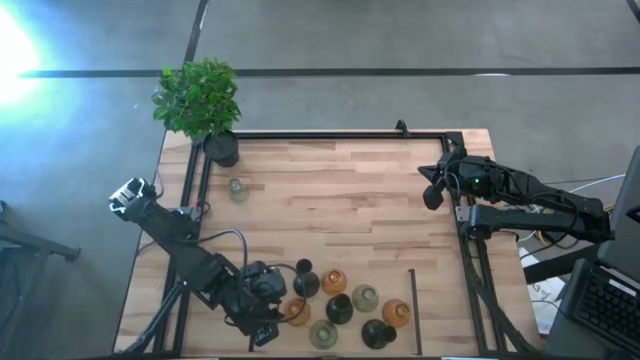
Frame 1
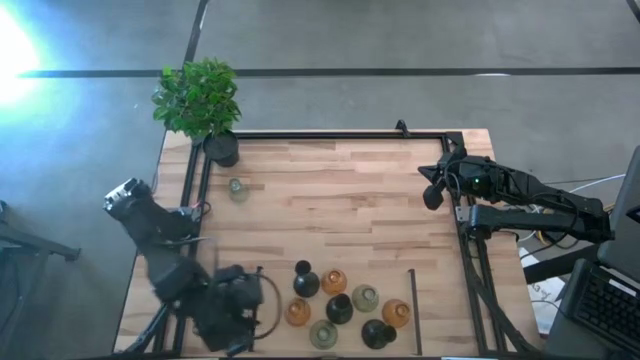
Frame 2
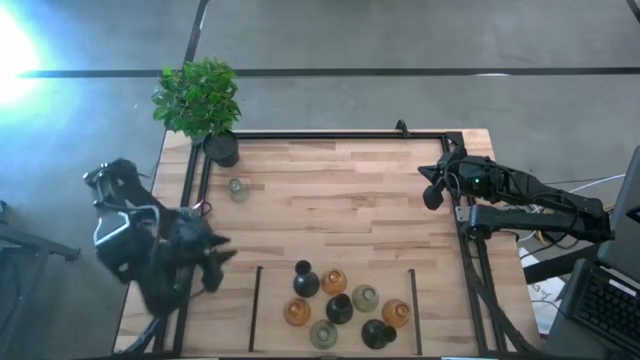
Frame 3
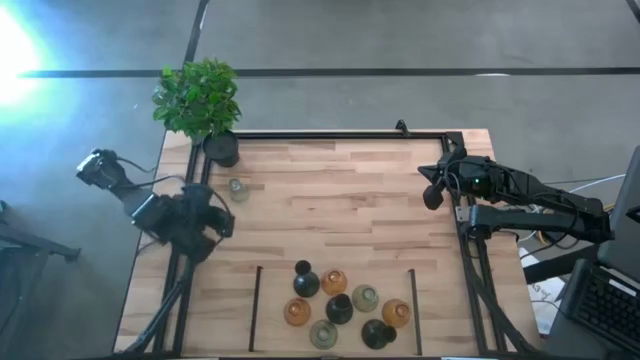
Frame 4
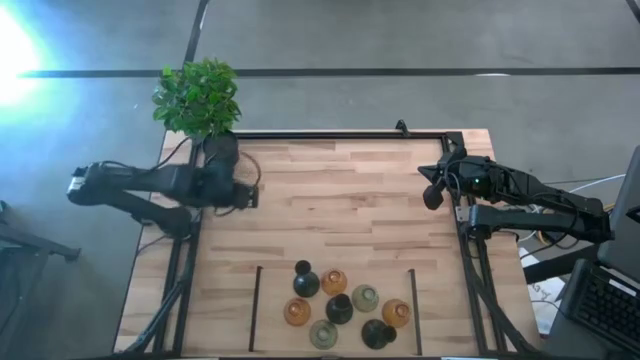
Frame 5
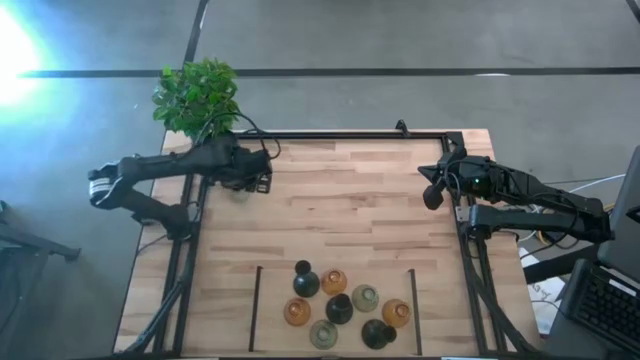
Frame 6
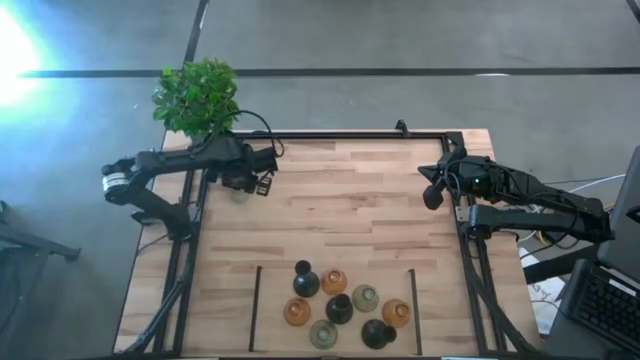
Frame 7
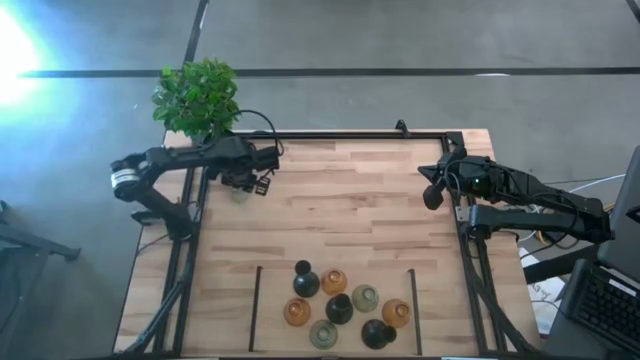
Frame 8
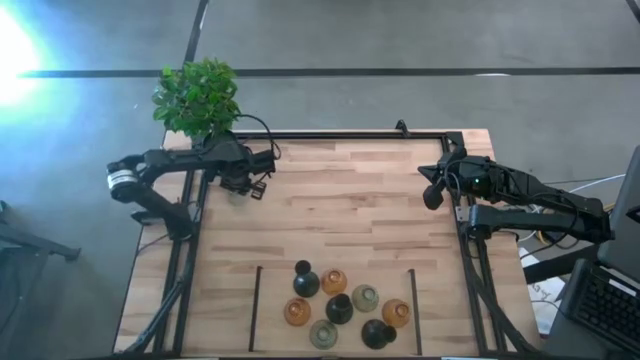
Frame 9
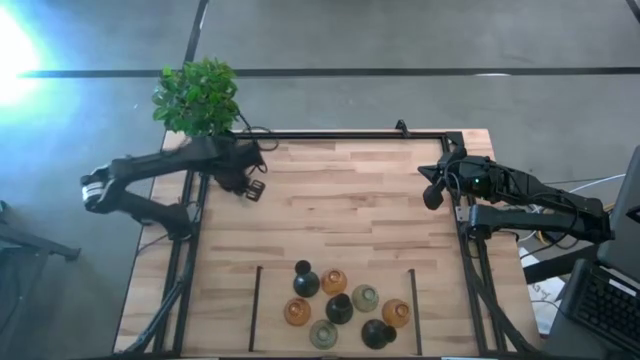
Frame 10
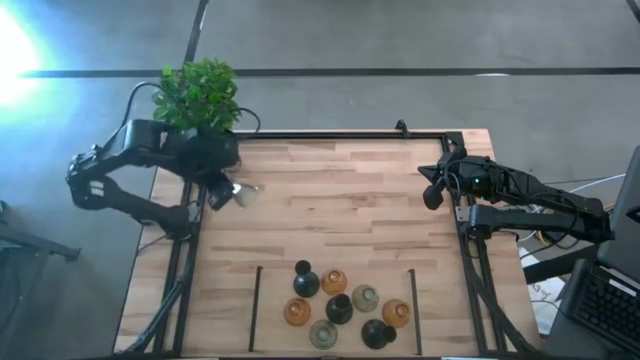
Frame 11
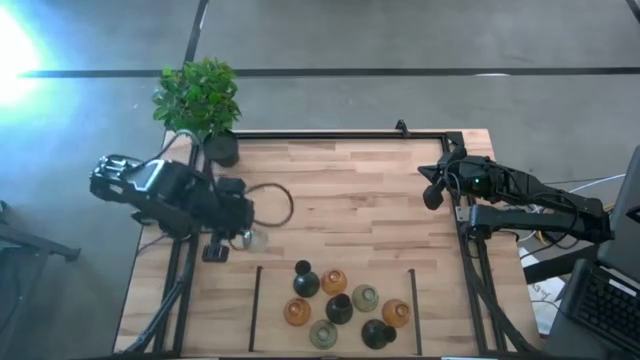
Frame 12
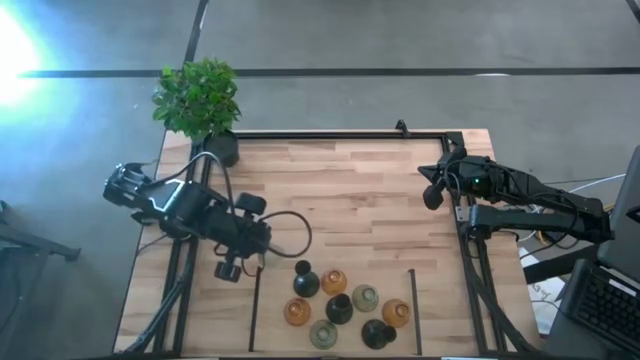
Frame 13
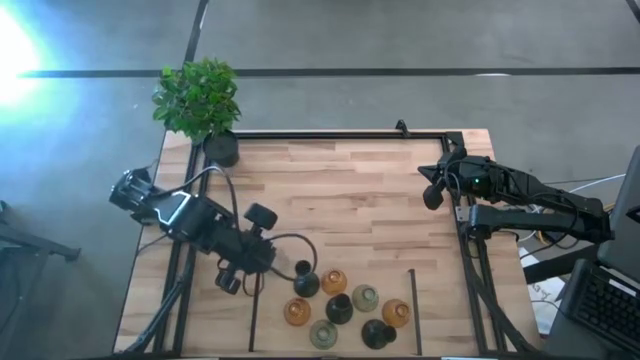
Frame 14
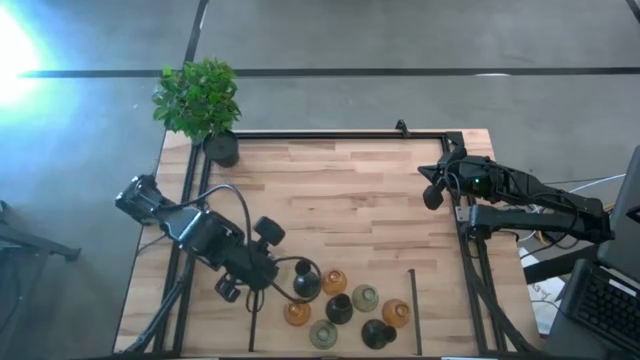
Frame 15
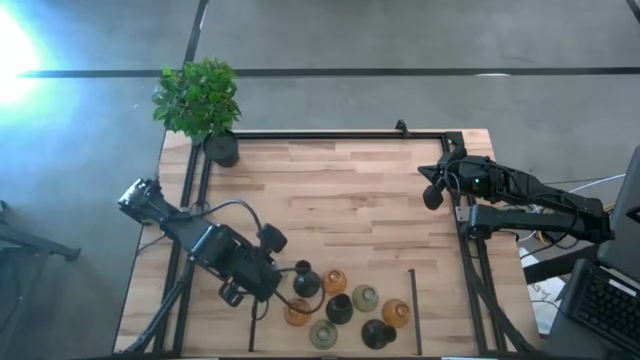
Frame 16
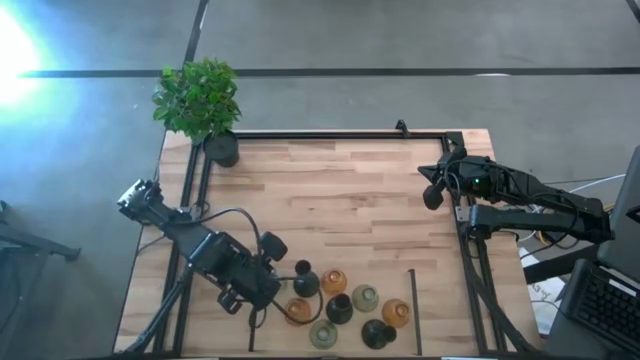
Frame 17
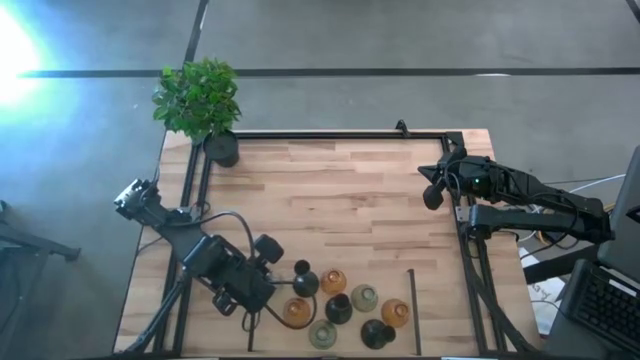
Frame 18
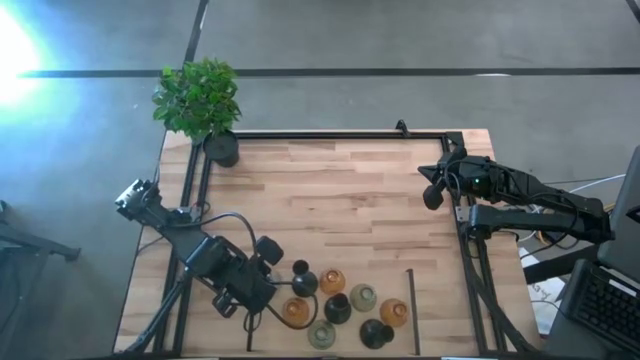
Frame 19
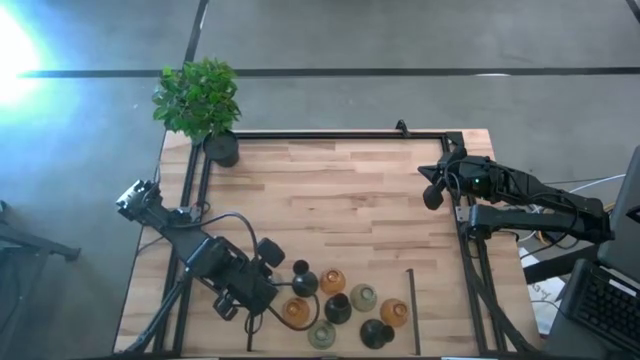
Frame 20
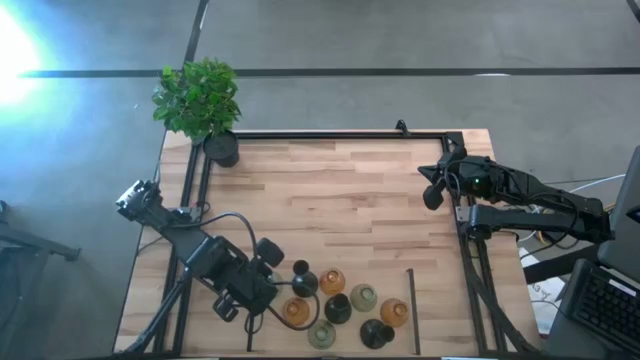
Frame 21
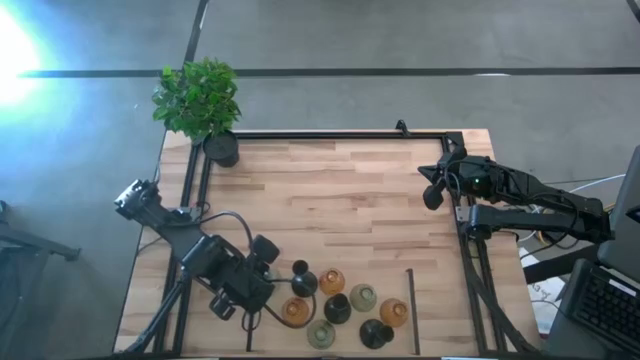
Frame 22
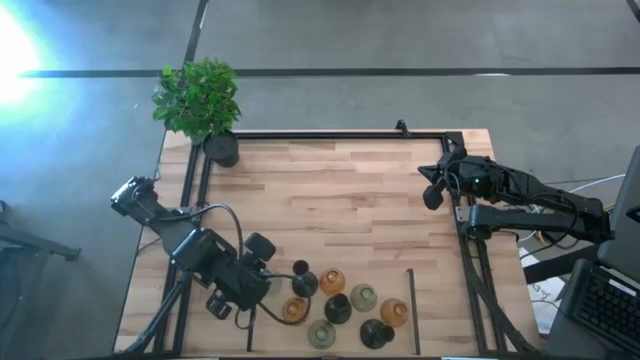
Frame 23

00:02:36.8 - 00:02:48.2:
Task: Pick & Place candle stick holders
Put the transparent glass candle holder on the shelf

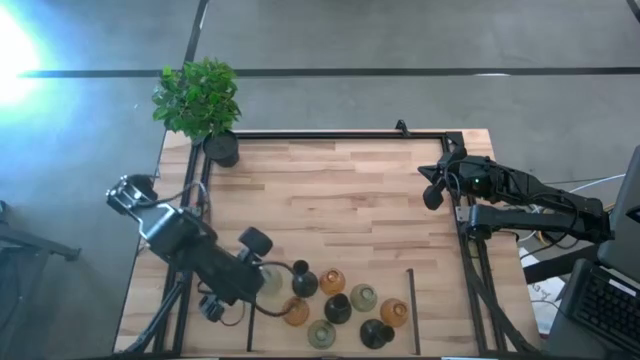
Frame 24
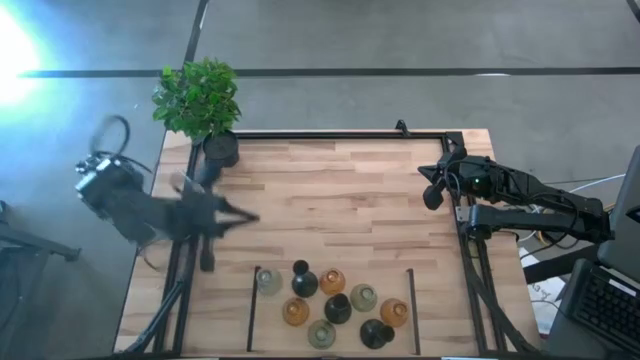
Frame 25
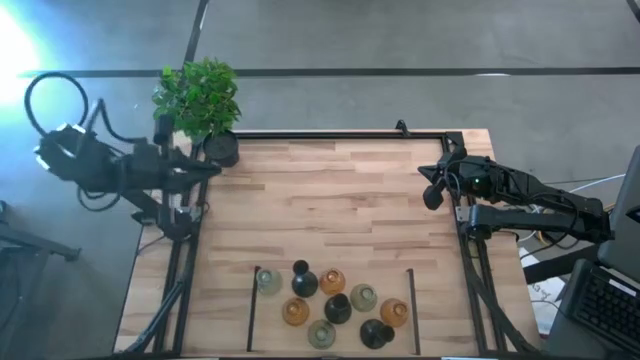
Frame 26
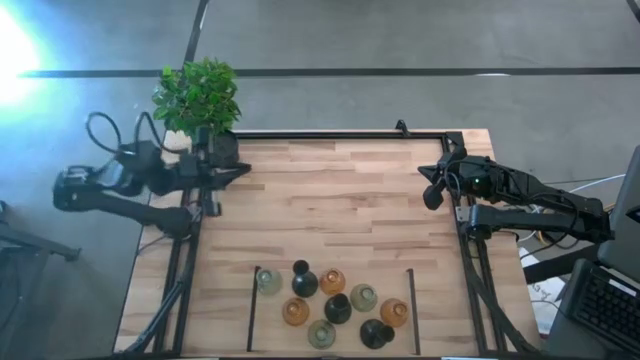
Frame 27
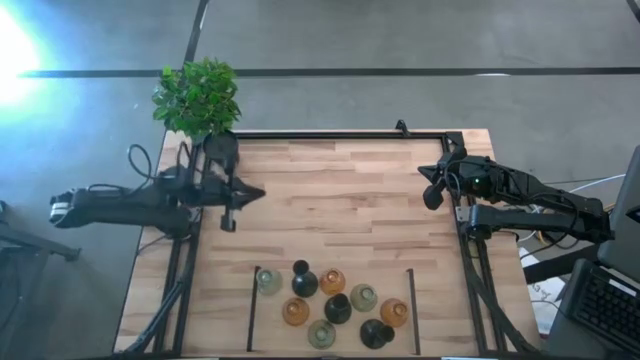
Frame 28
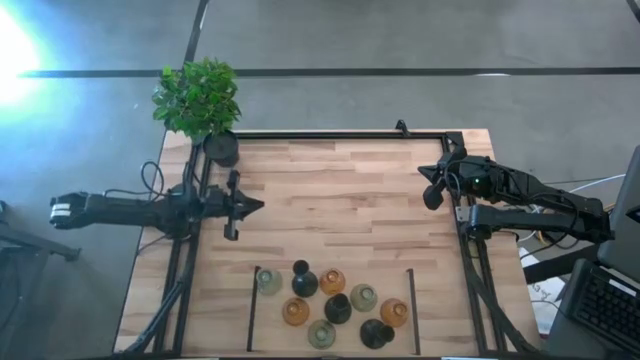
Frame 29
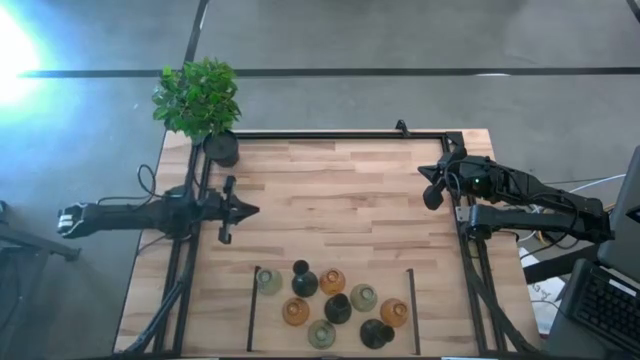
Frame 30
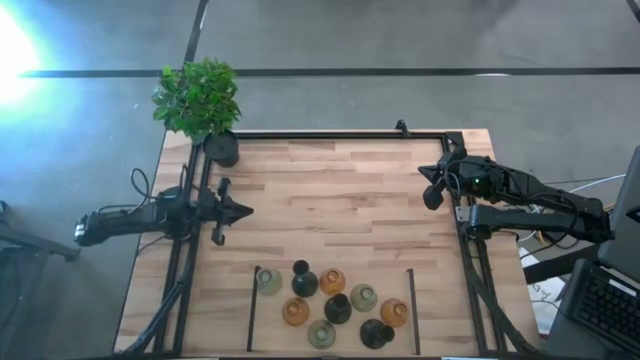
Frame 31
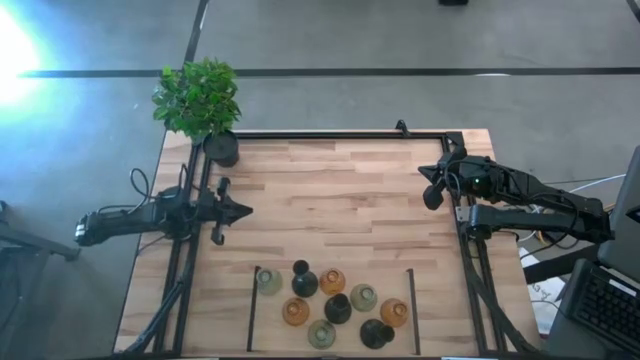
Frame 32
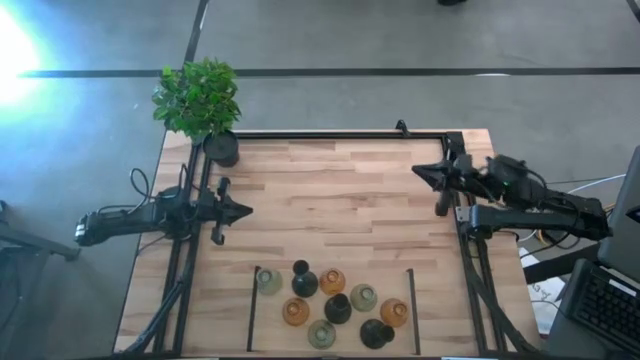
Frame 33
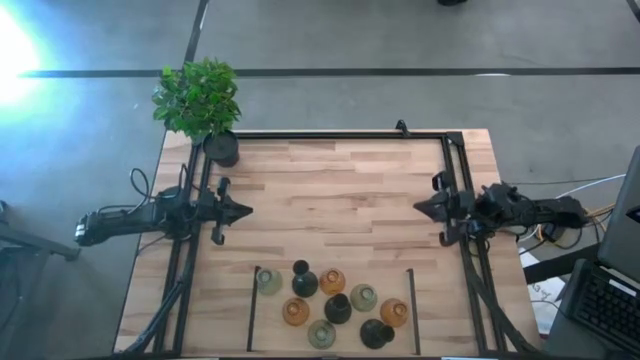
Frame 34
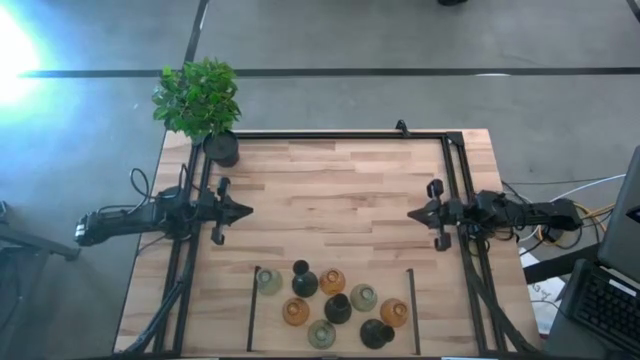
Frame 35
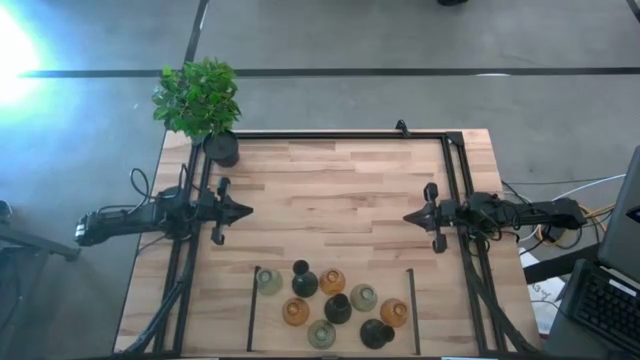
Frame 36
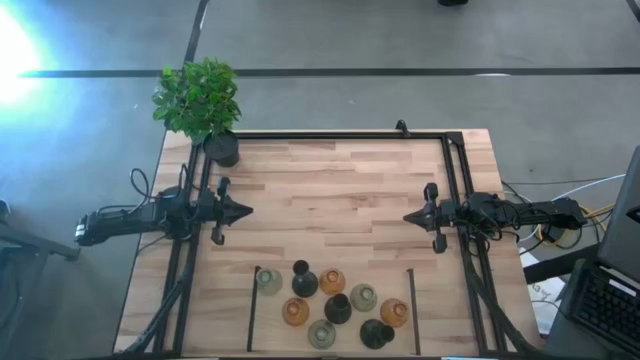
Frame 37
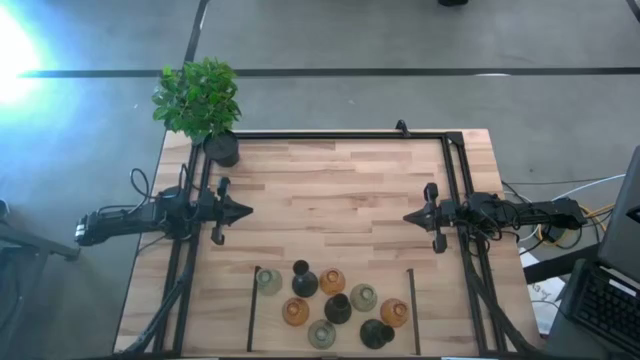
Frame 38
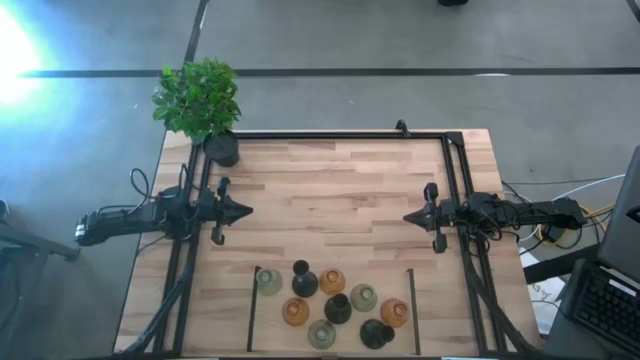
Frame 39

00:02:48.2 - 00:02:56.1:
Return to Home Position

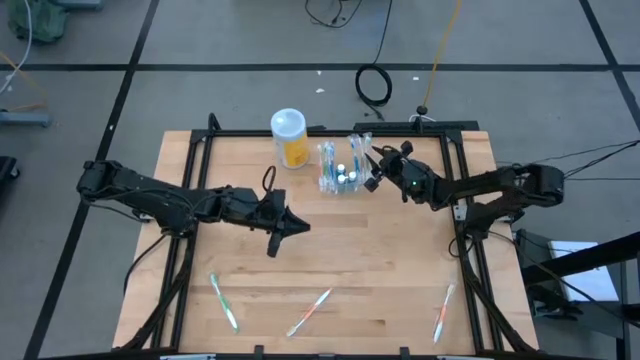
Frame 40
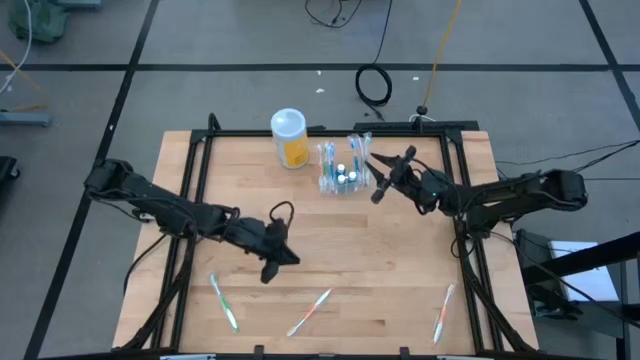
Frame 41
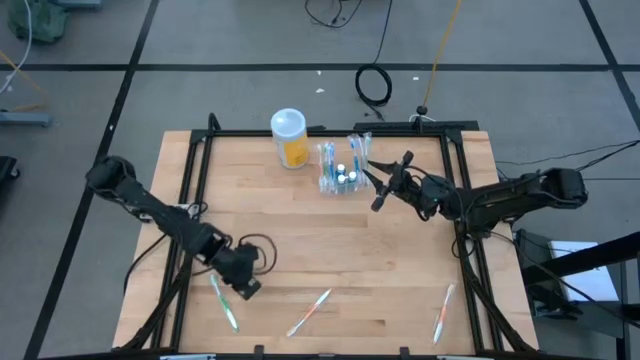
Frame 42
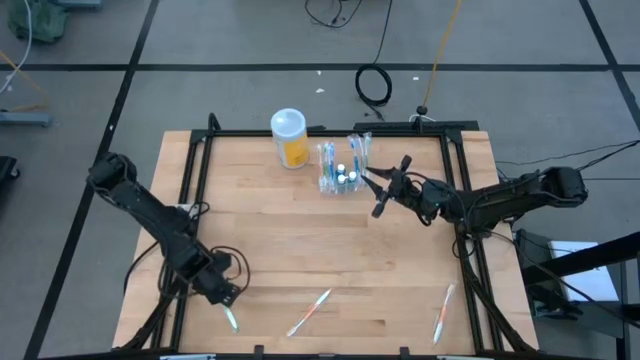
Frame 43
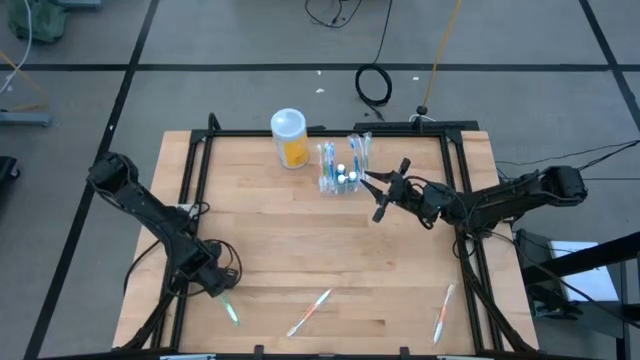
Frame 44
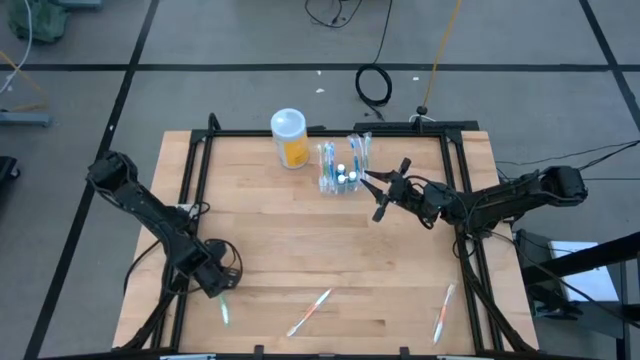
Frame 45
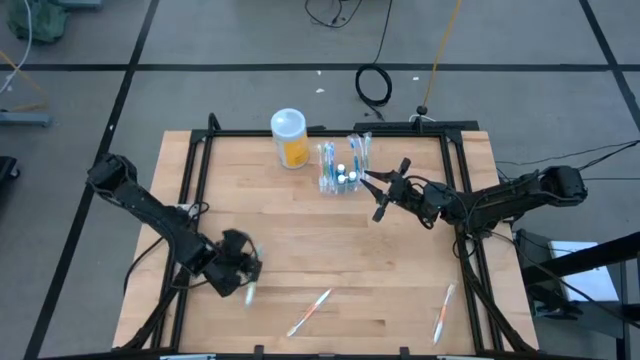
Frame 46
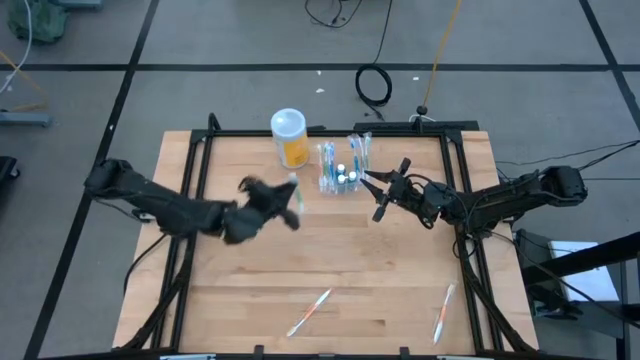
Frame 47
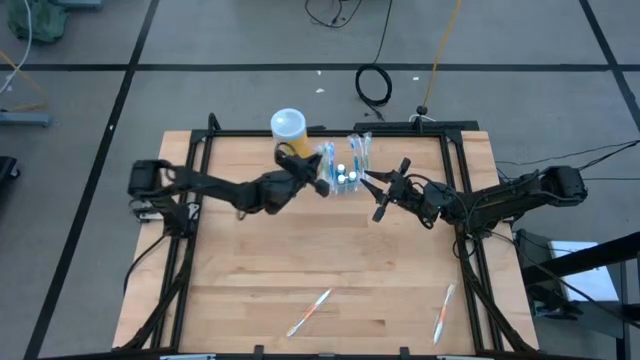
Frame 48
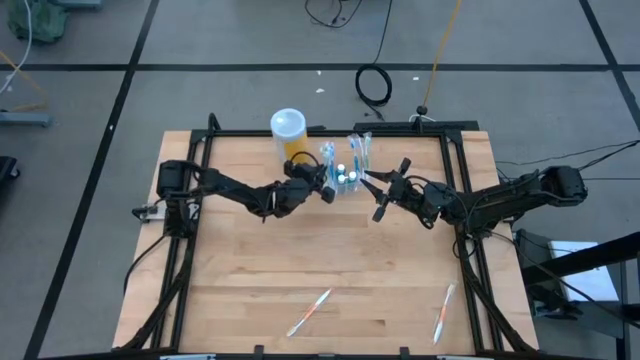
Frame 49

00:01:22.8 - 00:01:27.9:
Task: Pick & Place toothbrushing station
Put the green toothbrush into the transparent organizer
